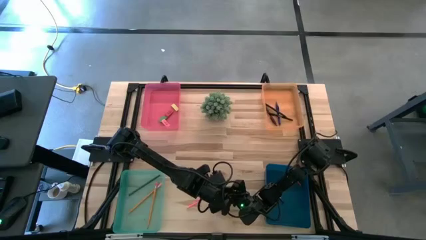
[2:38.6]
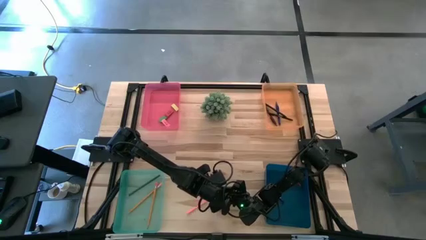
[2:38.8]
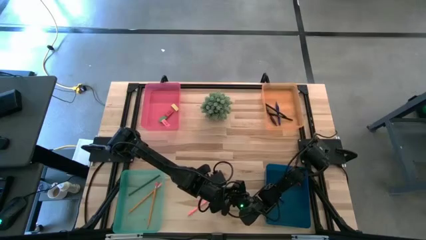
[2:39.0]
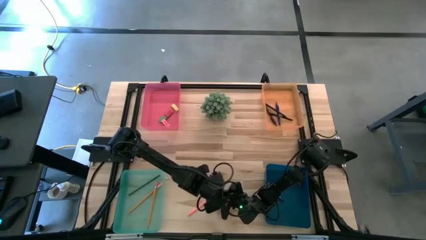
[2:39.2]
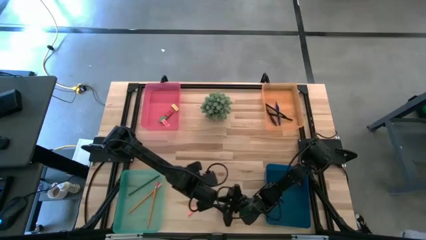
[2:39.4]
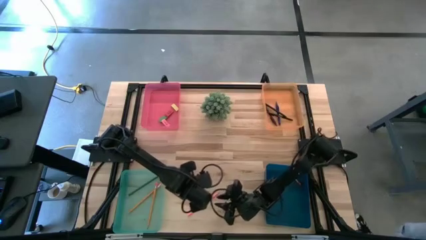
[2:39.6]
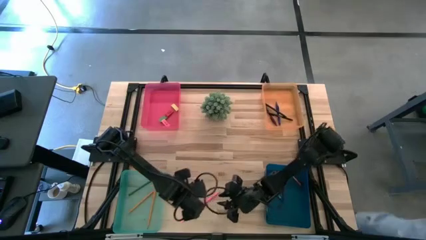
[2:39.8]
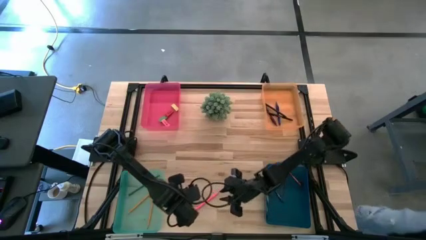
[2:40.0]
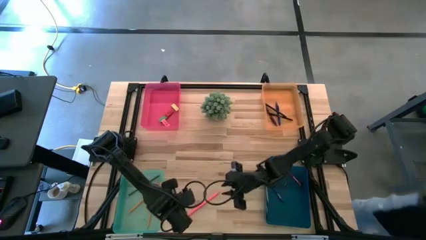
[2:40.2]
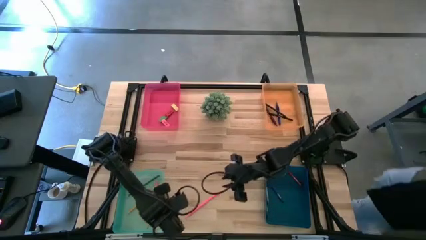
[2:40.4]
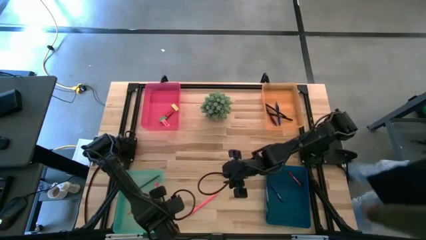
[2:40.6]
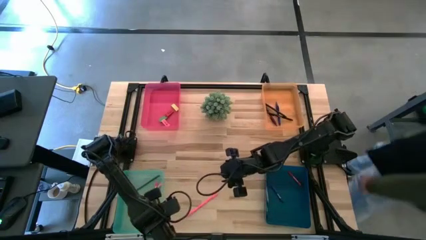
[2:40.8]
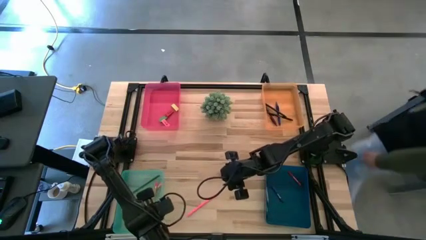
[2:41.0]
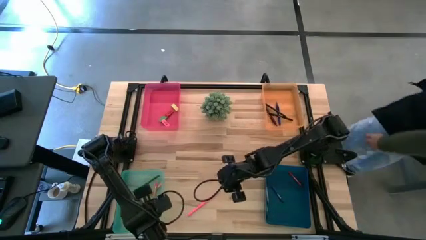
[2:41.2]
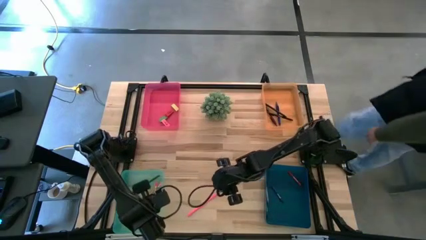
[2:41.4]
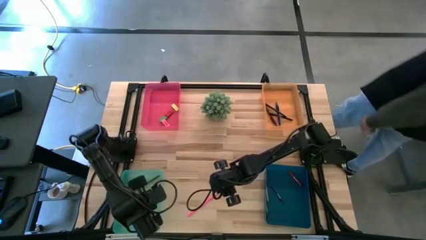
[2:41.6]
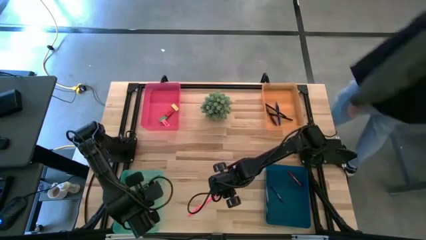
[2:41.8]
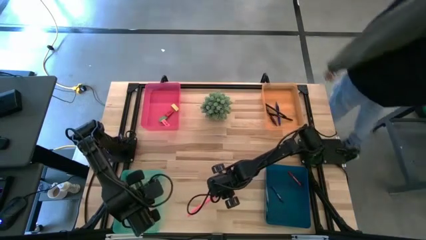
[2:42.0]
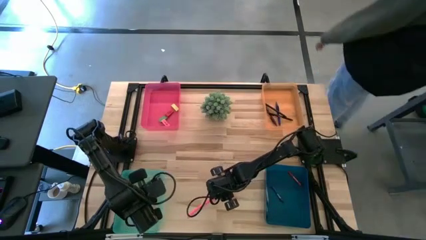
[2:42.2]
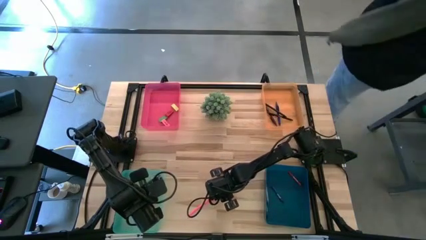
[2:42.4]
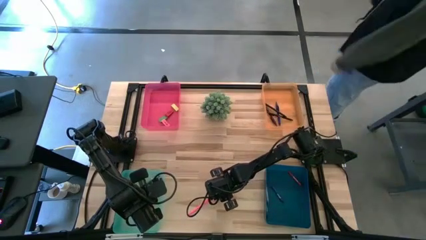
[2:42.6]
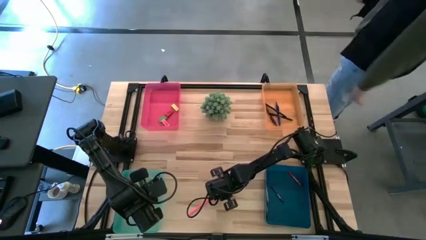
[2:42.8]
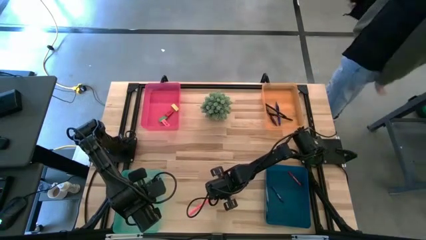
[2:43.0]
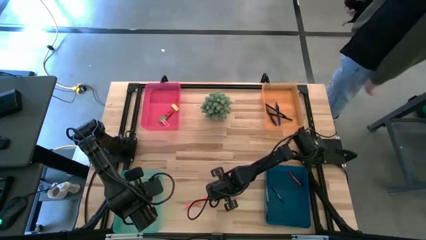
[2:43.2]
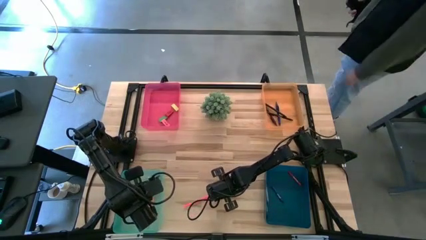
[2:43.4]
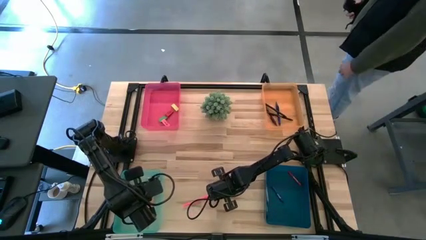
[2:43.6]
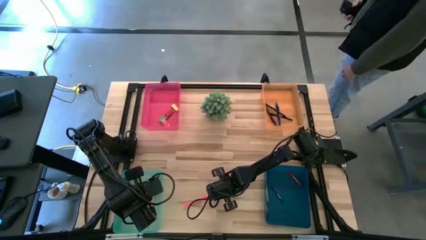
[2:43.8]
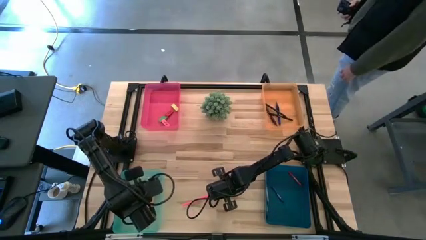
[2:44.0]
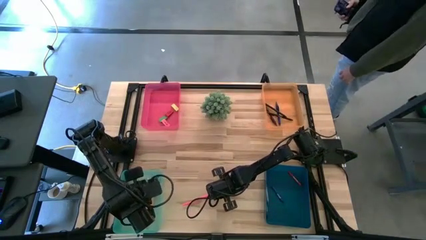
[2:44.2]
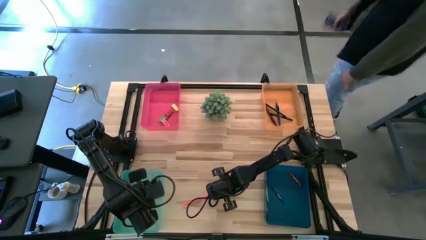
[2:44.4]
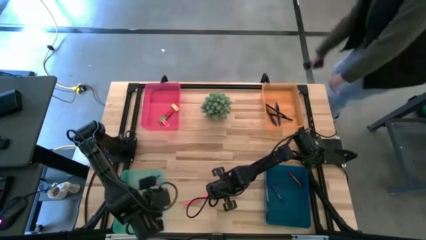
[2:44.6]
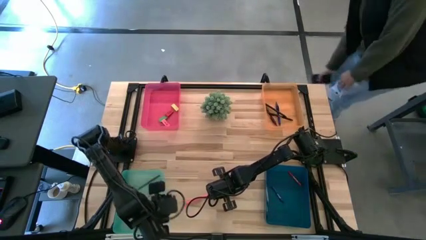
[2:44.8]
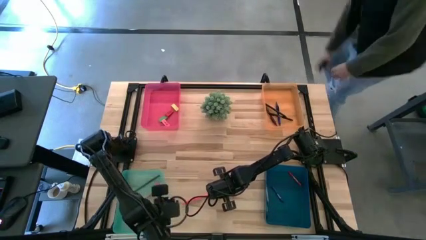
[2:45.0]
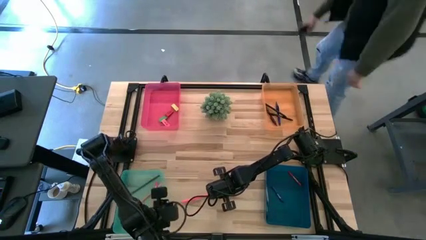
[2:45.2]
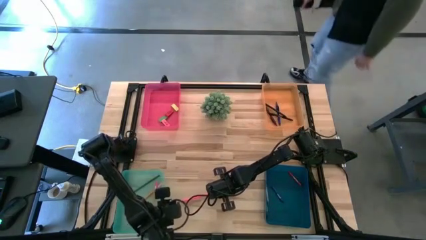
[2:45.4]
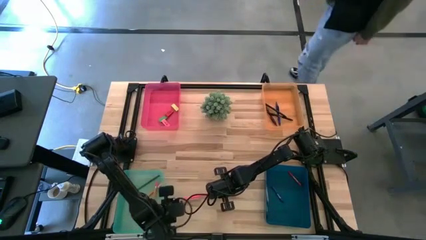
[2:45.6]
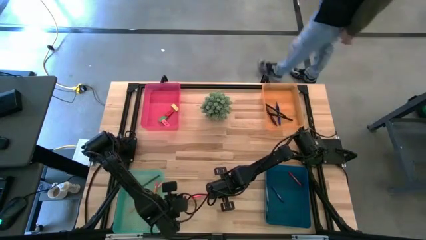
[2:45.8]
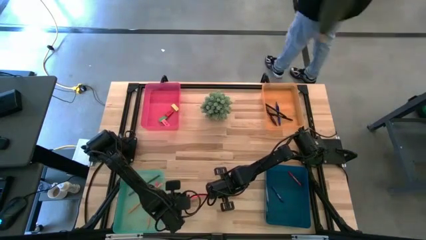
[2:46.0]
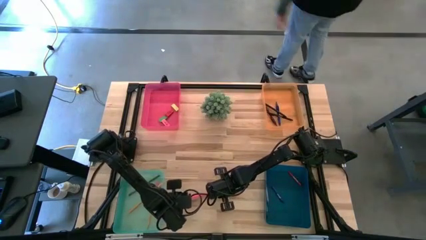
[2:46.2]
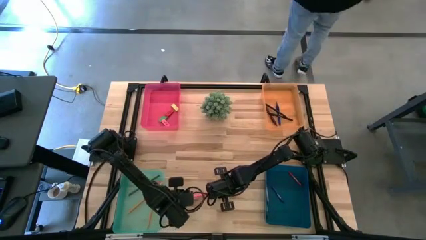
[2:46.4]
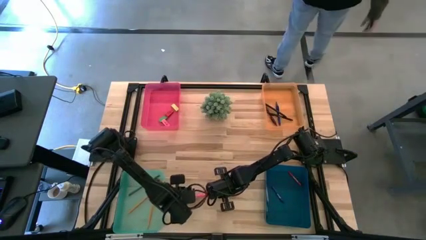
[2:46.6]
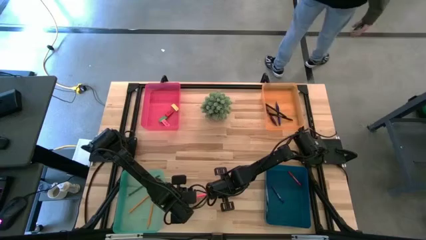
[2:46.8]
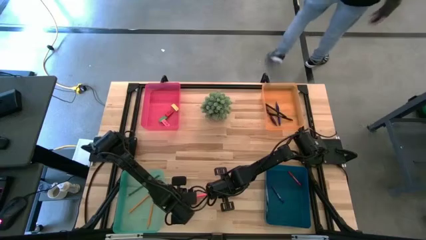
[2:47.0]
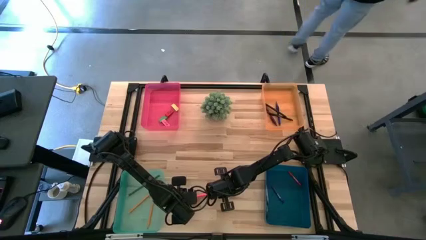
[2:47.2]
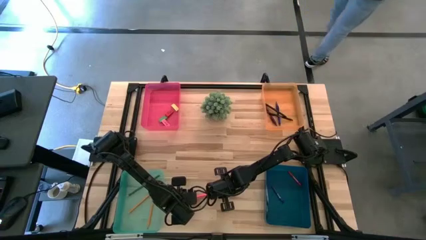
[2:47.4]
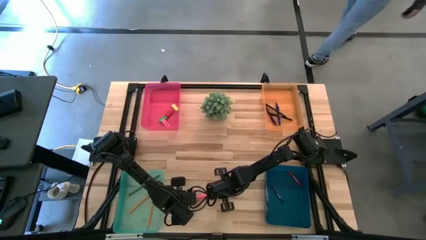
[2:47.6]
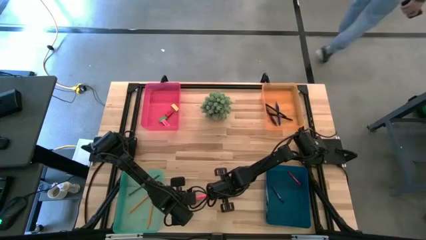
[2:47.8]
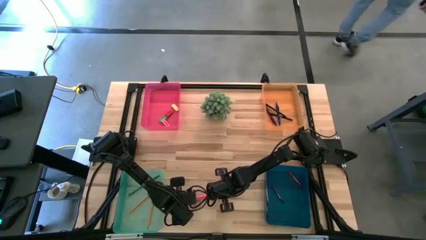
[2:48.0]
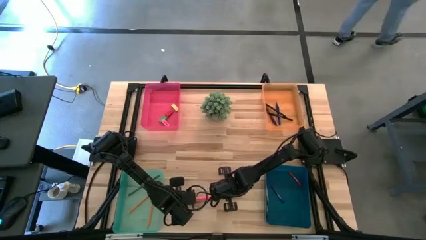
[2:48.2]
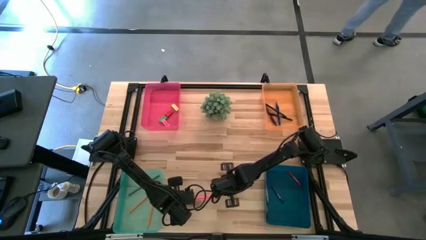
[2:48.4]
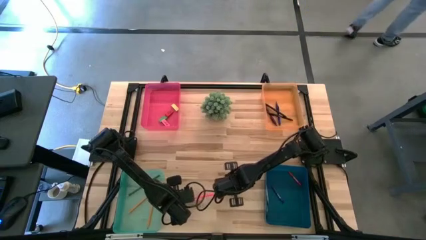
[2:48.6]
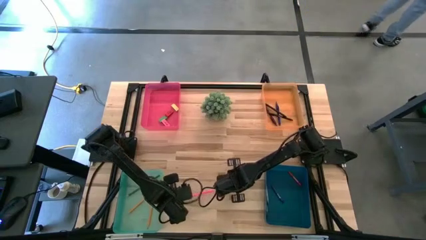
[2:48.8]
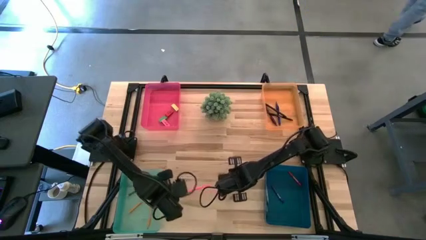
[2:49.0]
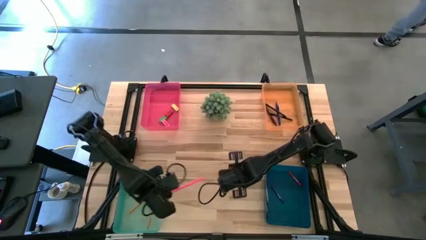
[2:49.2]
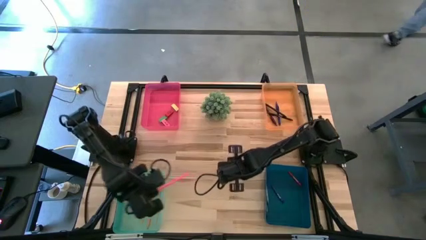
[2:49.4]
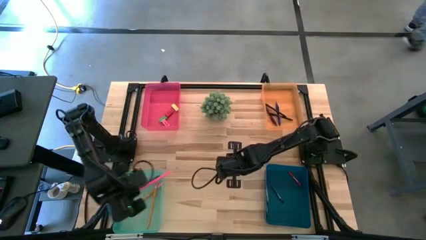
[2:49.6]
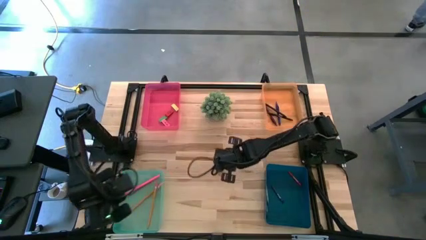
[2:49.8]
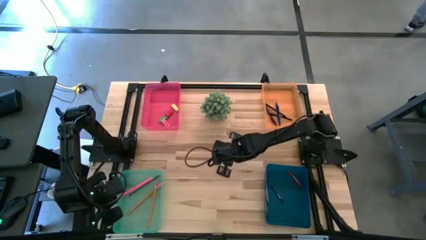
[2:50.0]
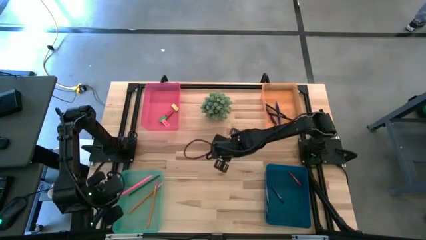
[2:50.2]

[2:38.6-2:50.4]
Task: Sort crayons/erasers/pens/pencils in bins
Put the pink pencil into the green bin

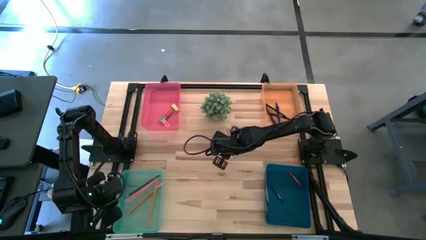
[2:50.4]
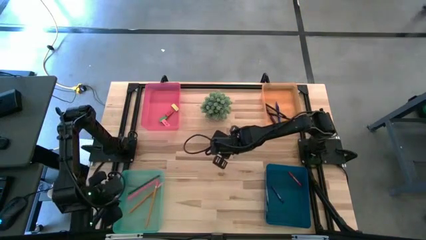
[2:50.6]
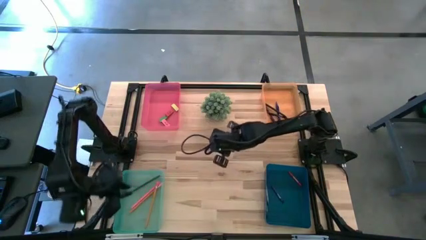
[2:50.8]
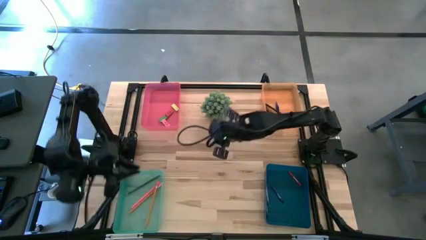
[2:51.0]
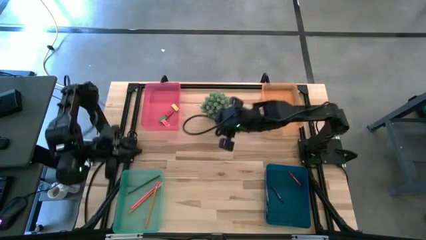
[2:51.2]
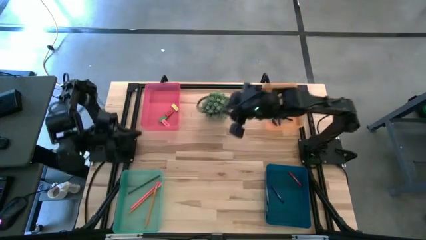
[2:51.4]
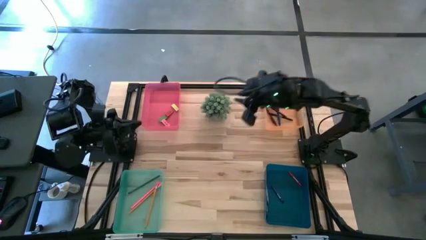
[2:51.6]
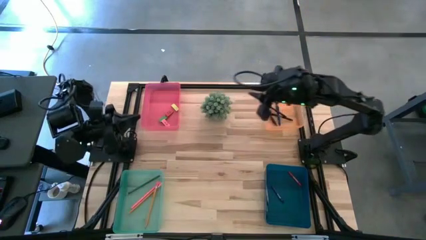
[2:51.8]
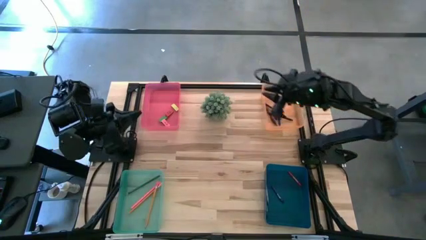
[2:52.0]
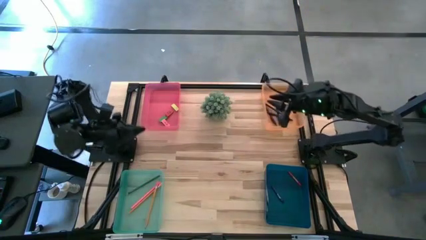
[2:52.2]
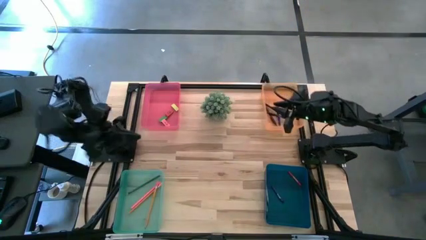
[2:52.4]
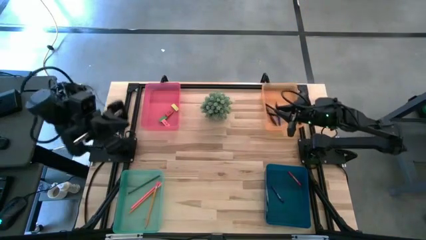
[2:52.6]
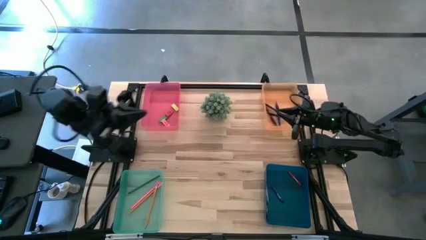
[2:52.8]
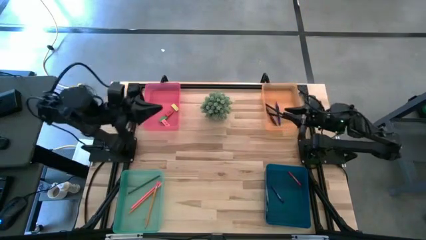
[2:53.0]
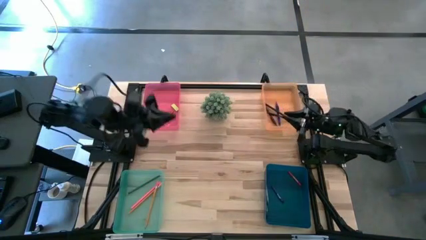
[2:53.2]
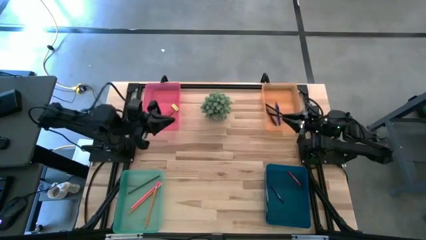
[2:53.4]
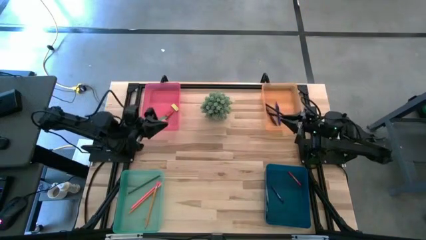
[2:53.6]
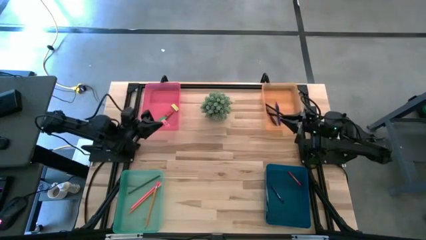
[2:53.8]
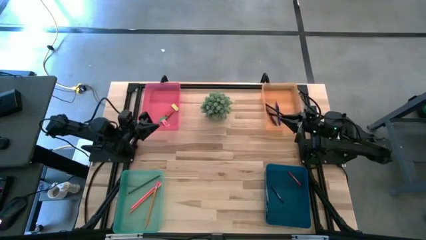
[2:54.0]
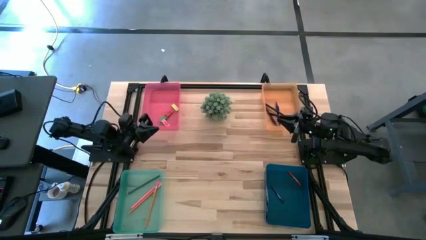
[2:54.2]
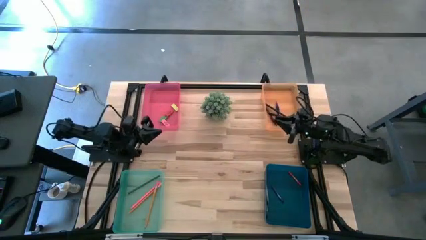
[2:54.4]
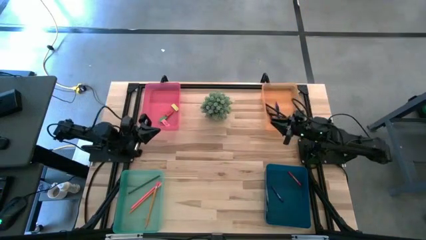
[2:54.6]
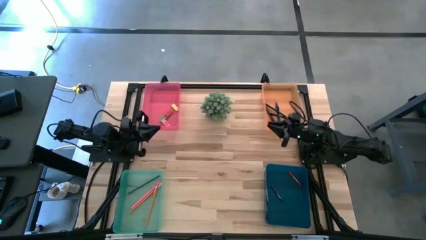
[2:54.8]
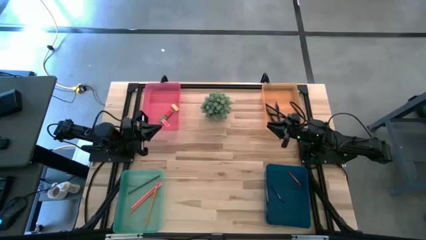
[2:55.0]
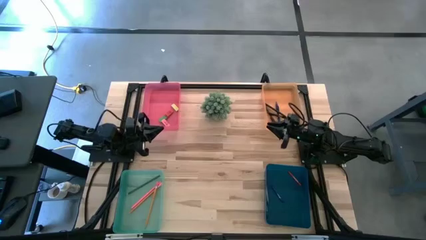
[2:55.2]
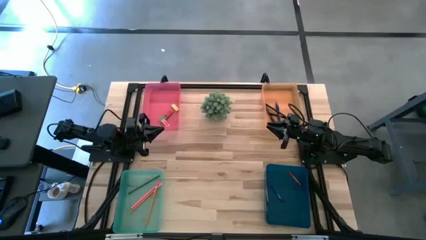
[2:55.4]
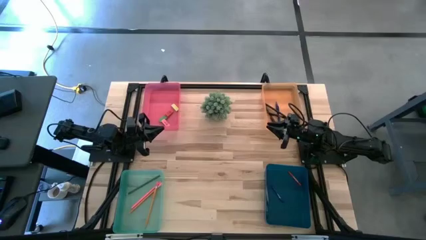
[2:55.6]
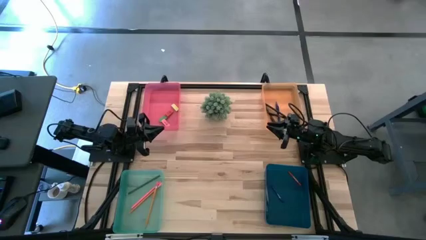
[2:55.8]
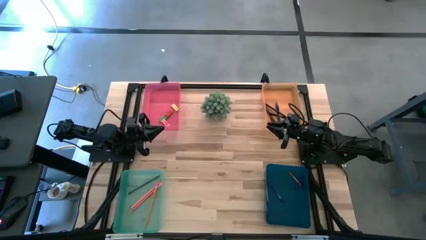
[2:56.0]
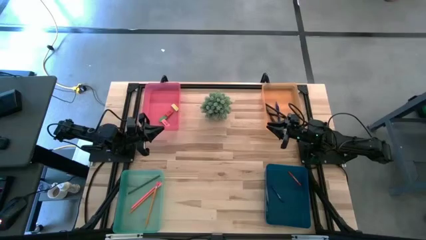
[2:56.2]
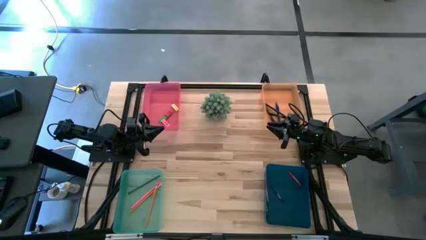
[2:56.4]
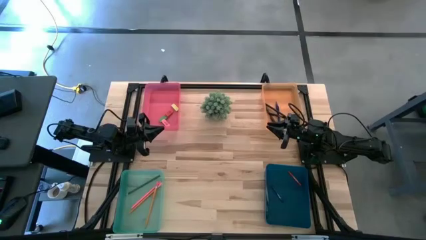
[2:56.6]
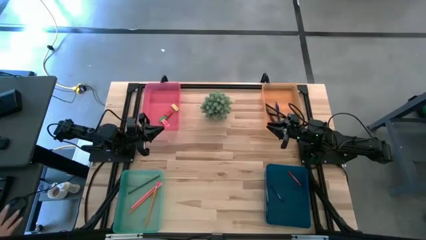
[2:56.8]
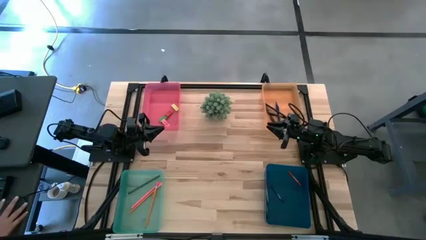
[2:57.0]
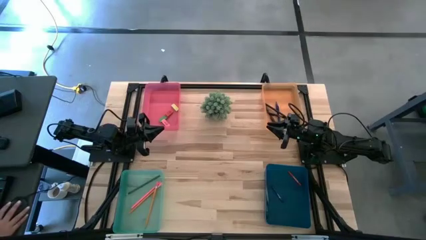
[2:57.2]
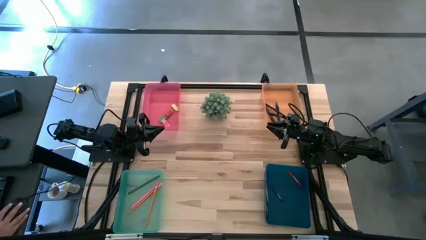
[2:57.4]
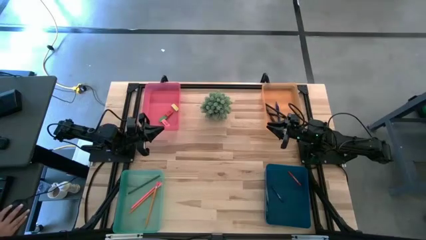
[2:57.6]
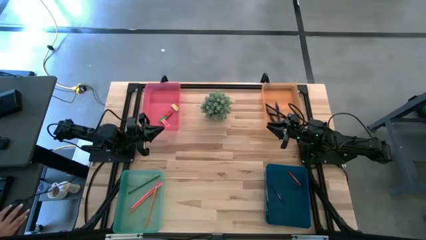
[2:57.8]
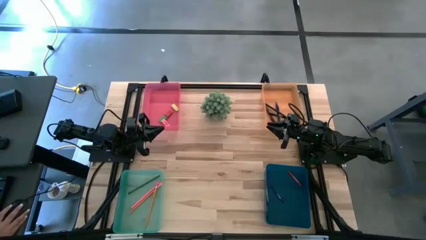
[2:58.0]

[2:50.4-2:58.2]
Return to Home Position
